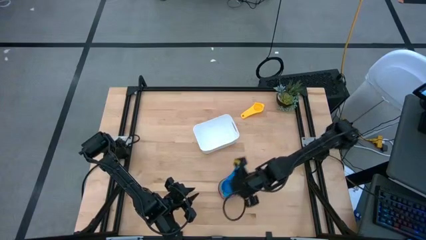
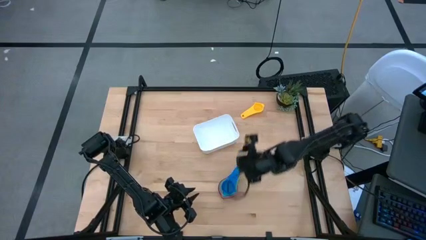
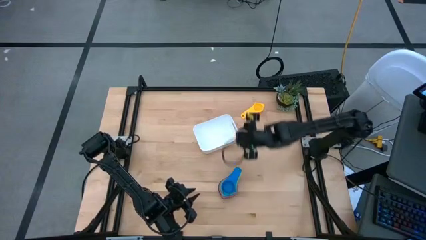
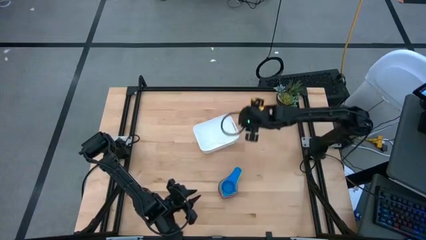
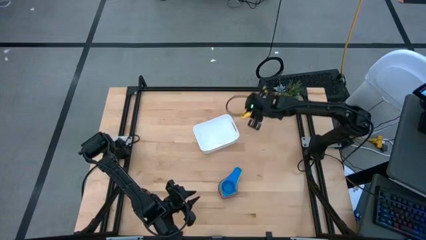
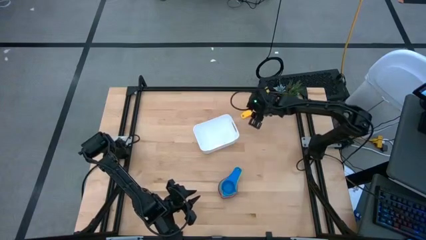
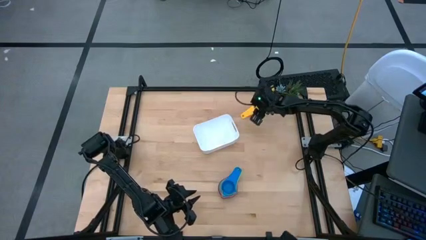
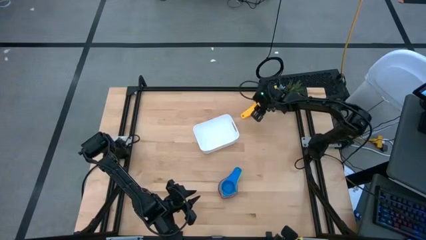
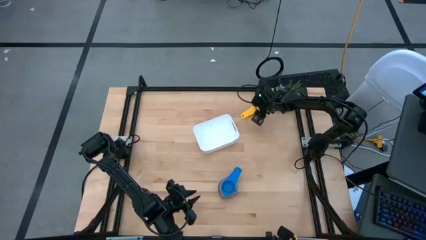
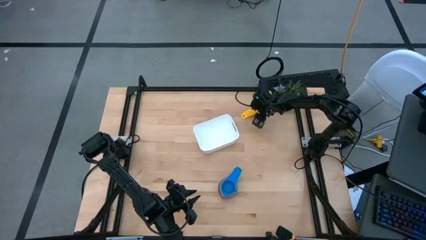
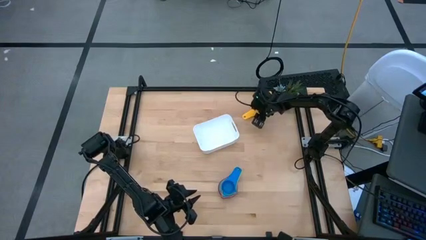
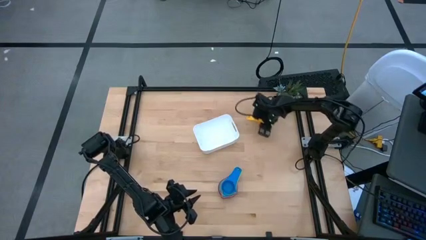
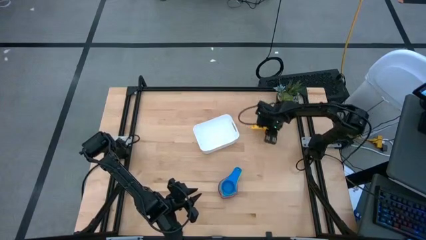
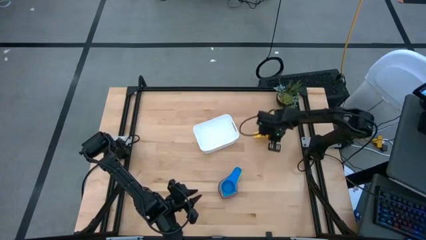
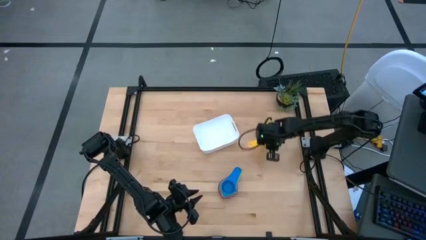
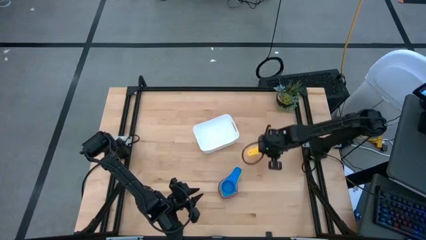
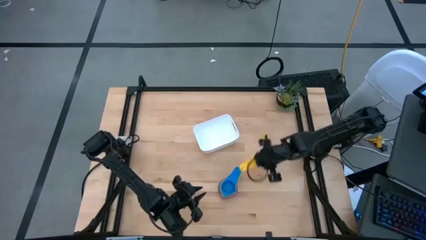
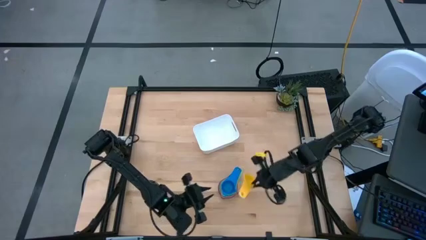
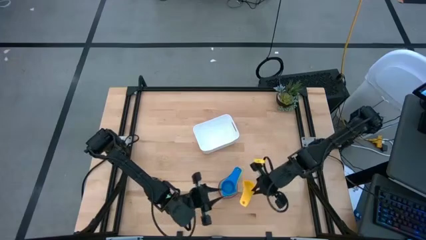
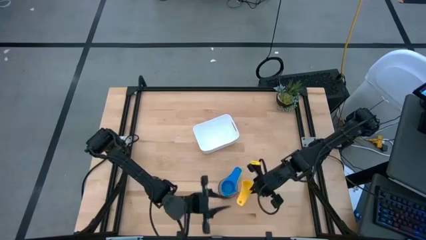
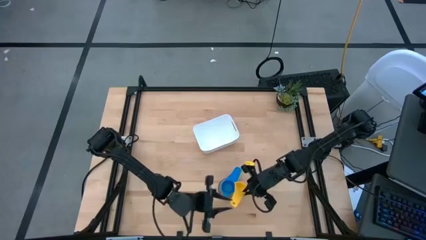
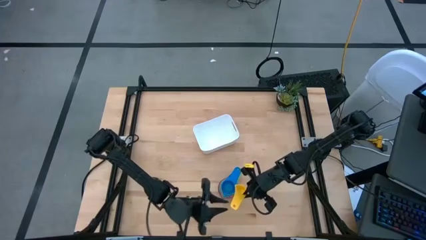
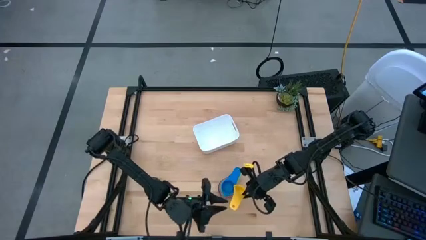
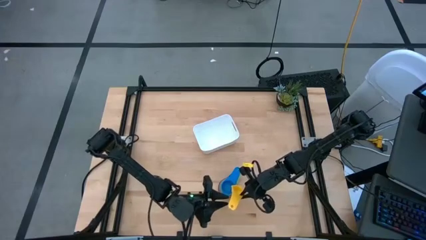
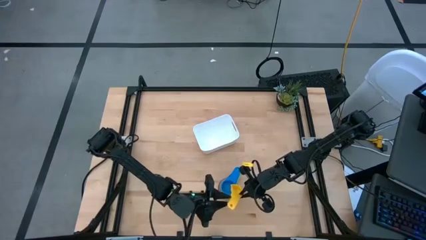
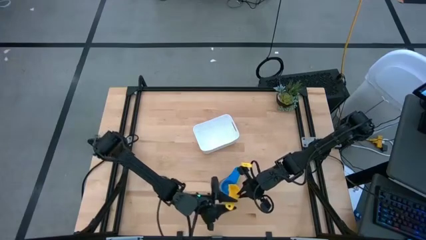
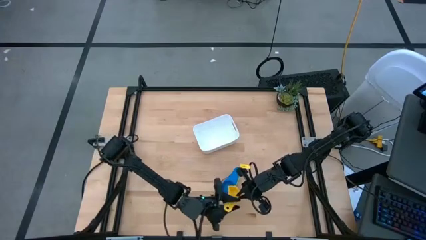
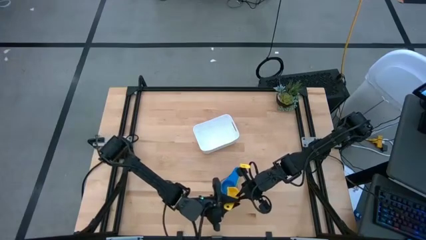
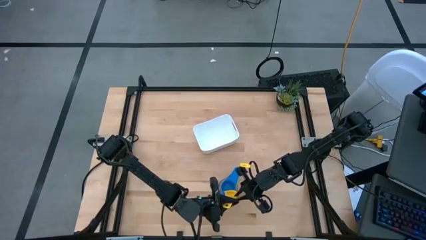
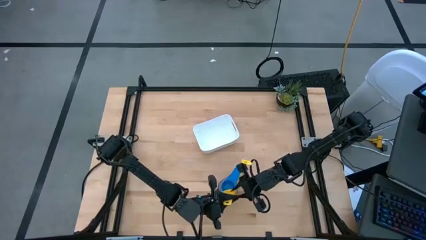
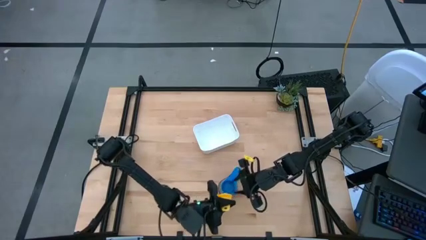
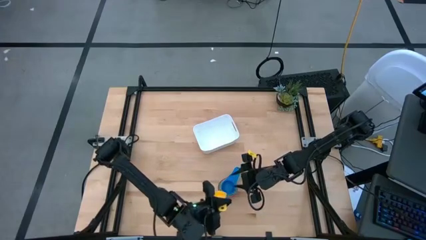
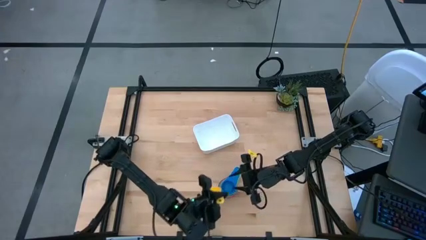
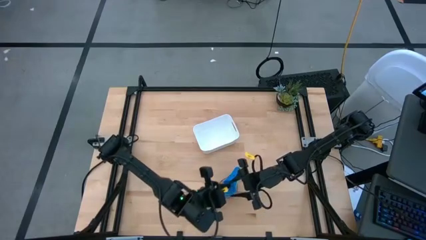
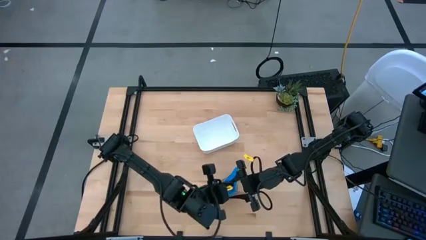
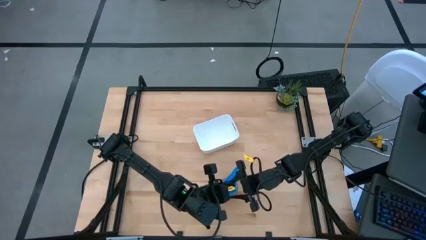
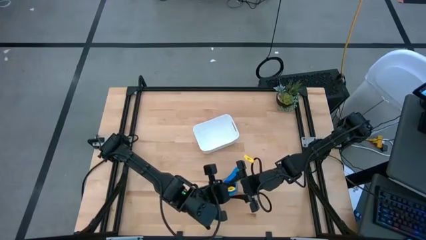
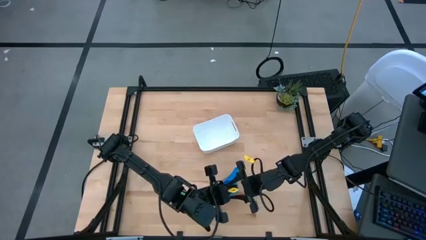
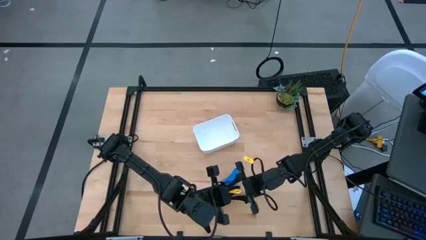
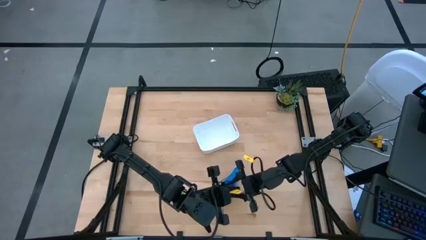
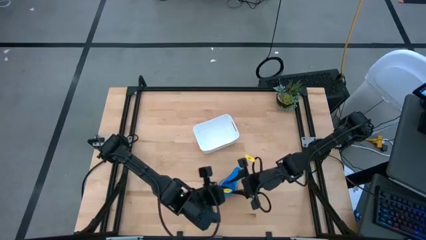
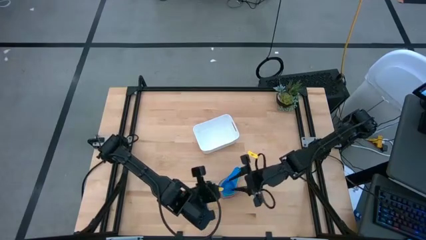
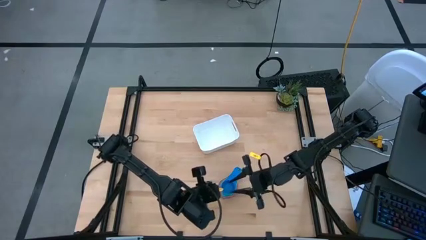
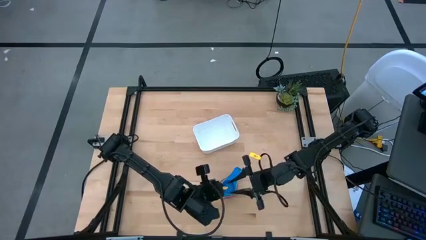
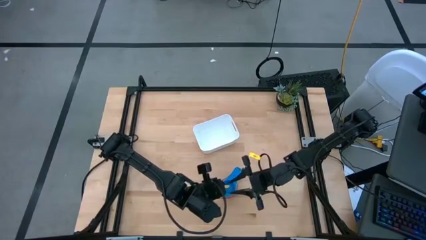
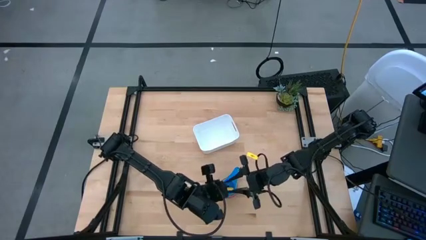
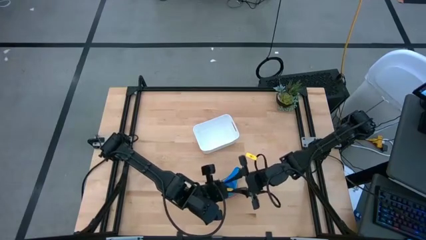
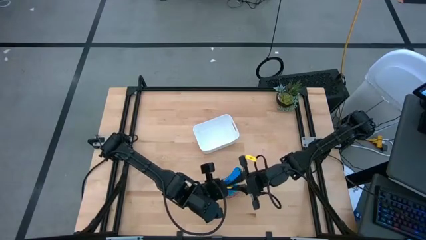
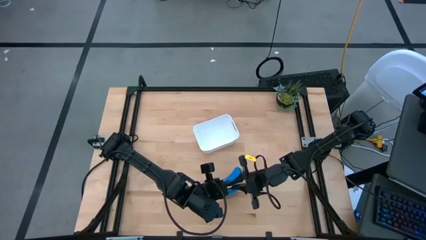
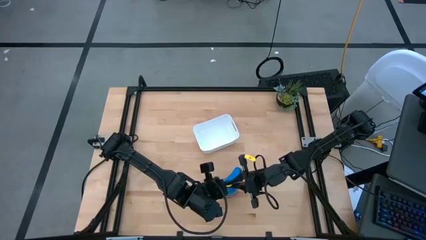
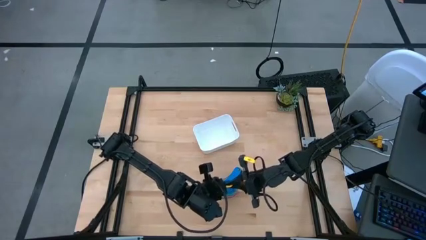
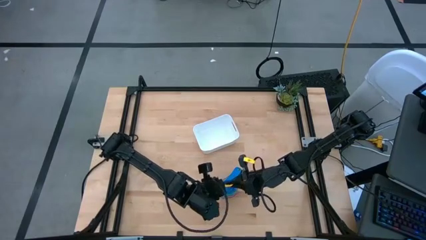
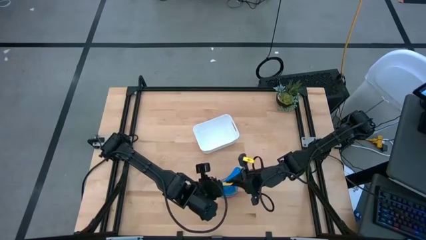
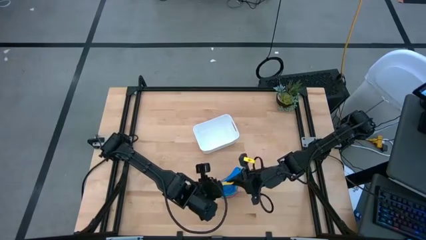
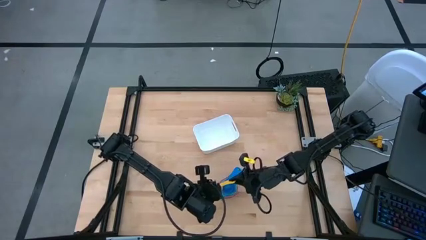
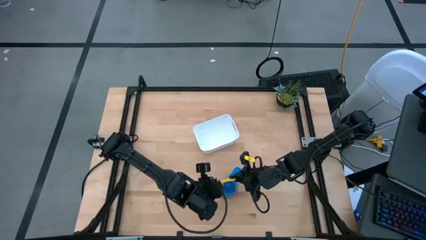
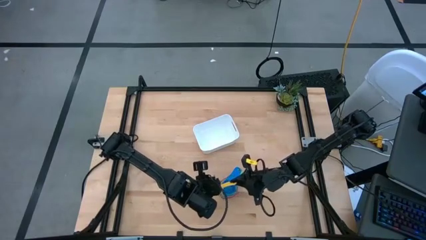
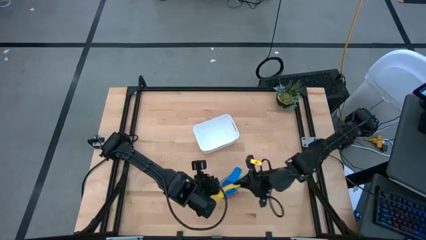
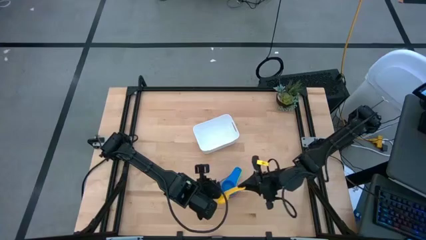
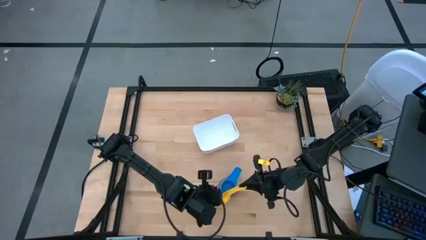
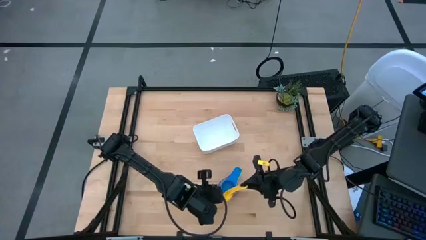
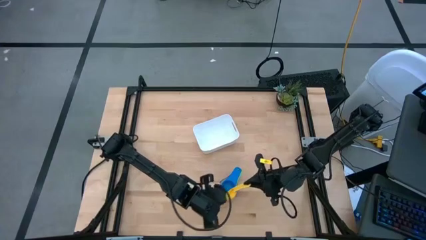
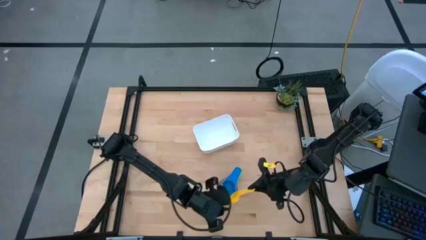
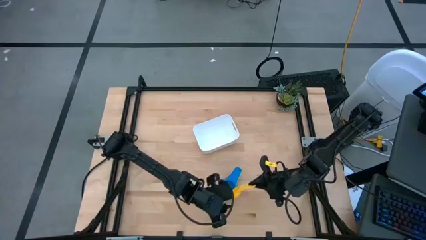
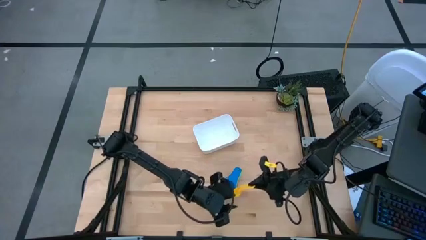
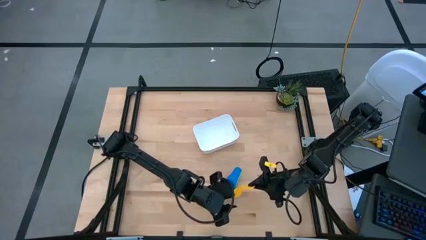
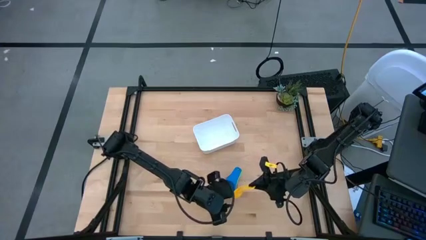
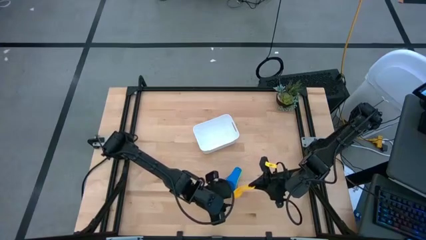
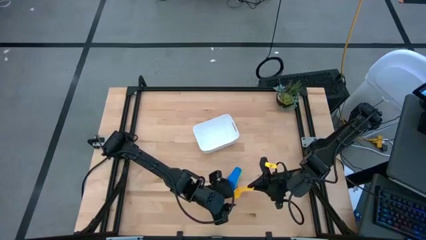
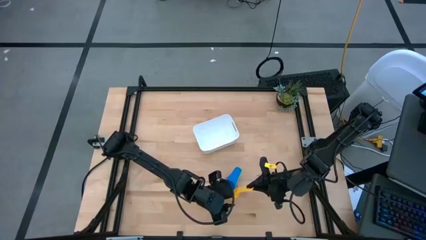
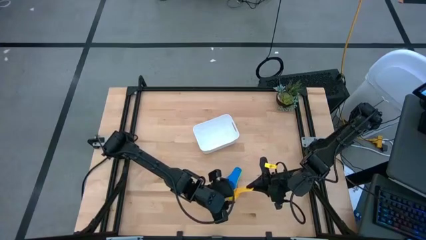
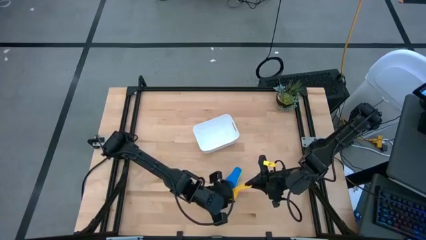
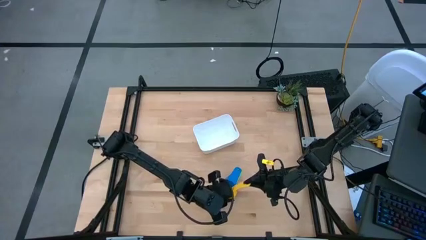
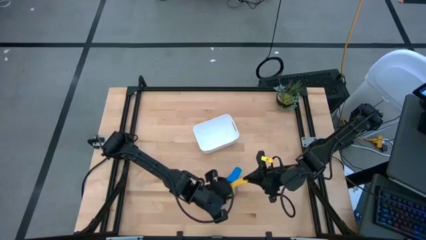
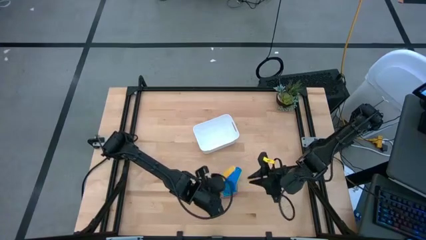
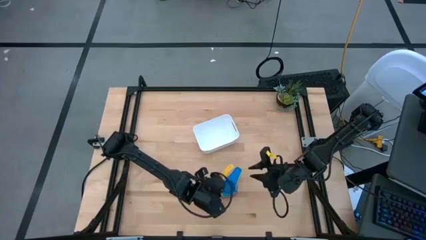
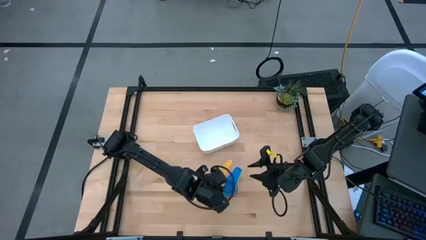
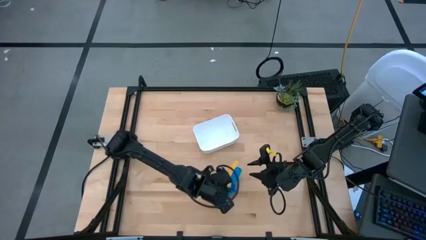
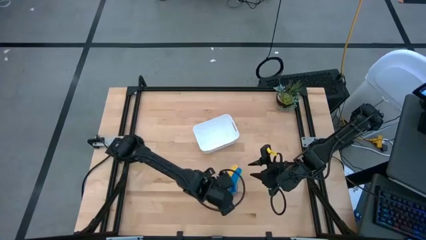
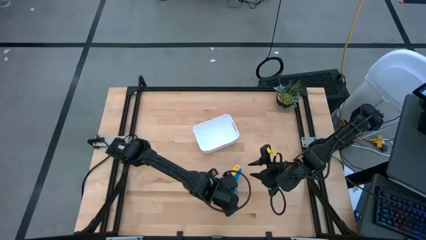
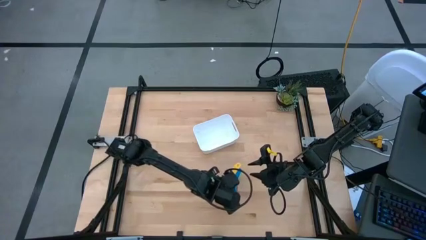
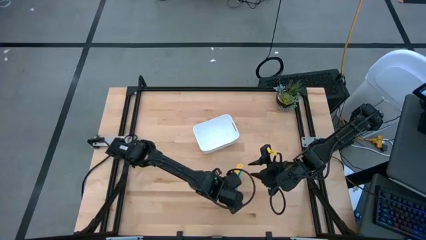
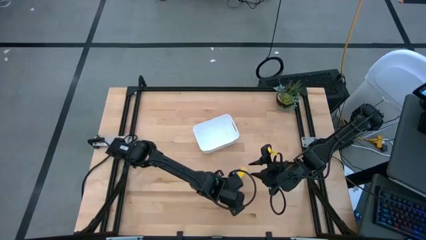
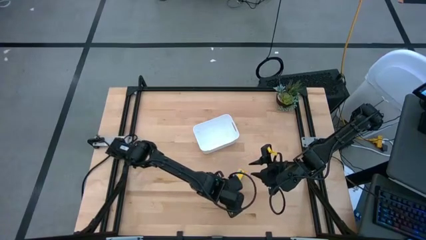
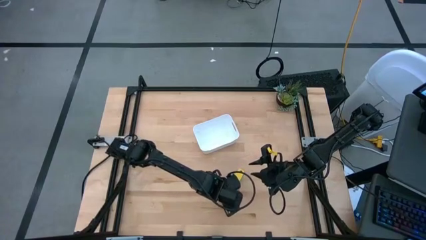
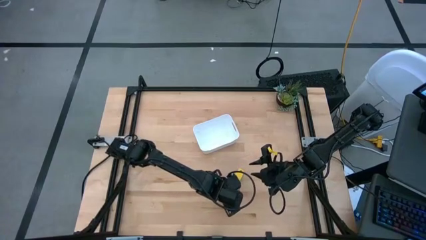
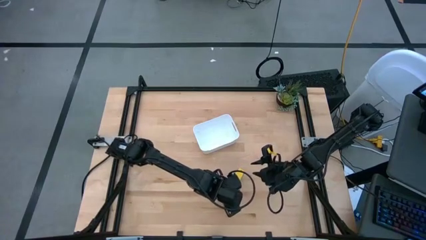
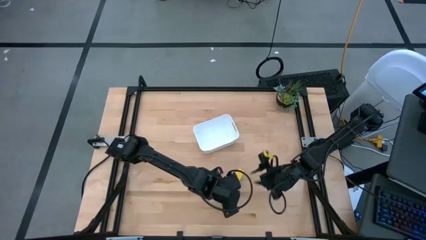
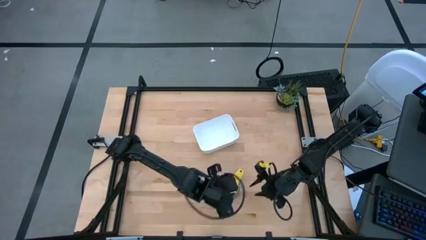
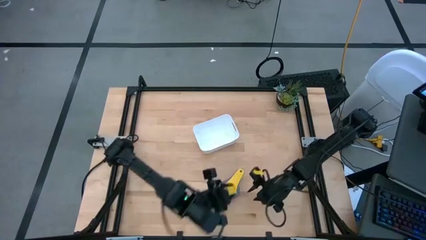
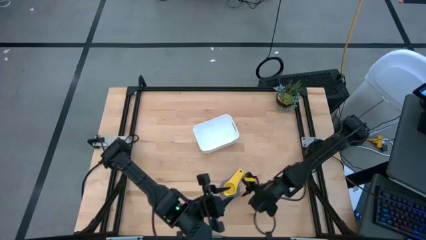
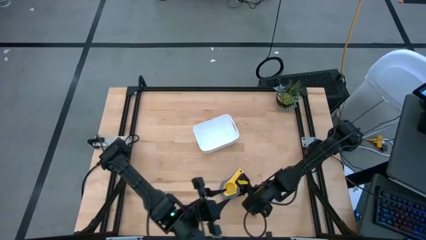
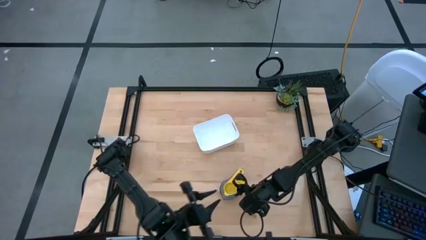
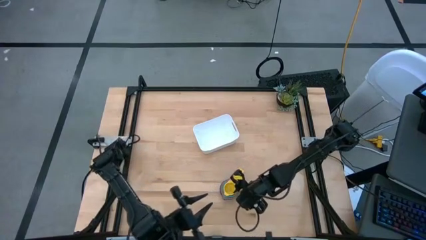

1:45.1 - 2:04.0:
Task: Nest measuring cups in basket
Stack the yellow measuring cup on top of the stacked measuring cups
